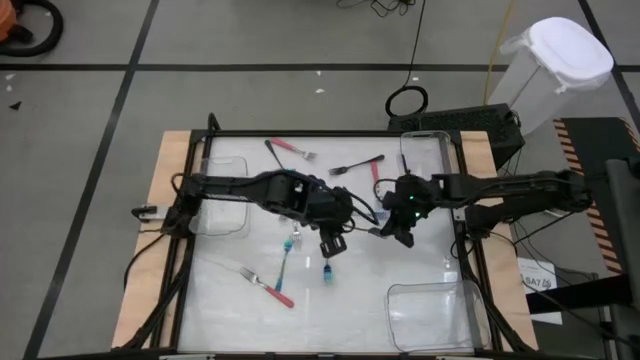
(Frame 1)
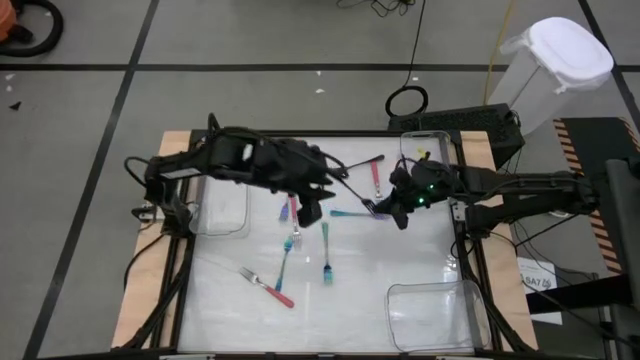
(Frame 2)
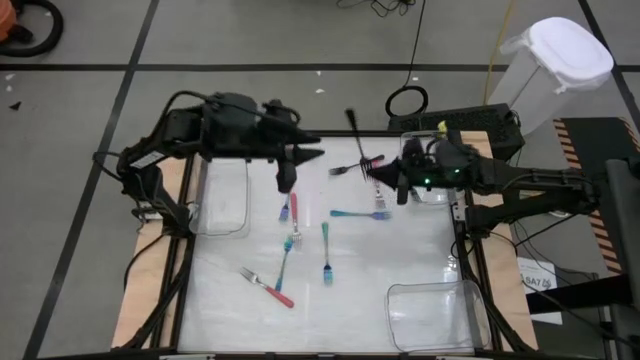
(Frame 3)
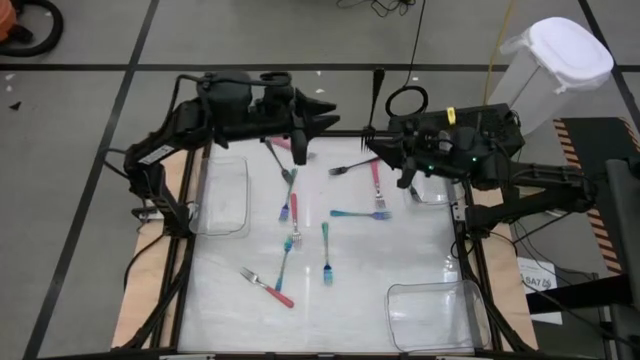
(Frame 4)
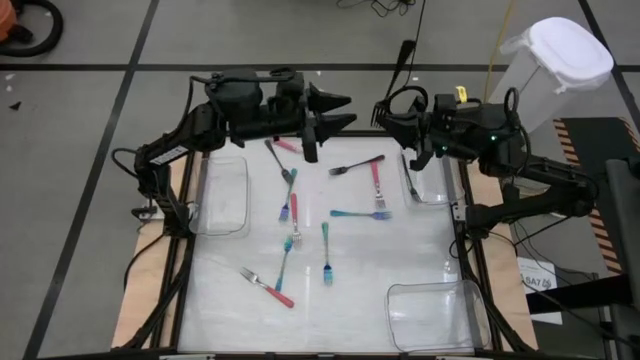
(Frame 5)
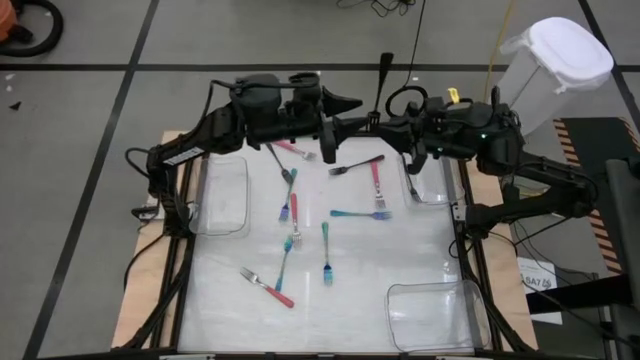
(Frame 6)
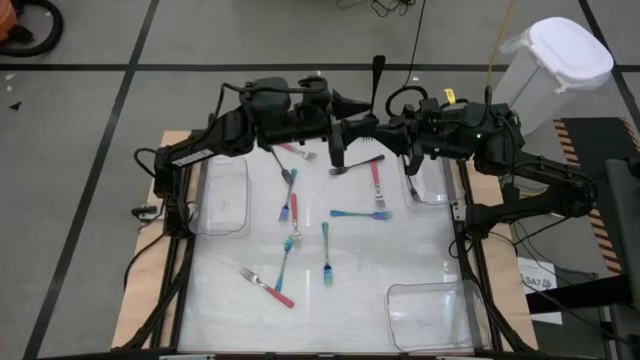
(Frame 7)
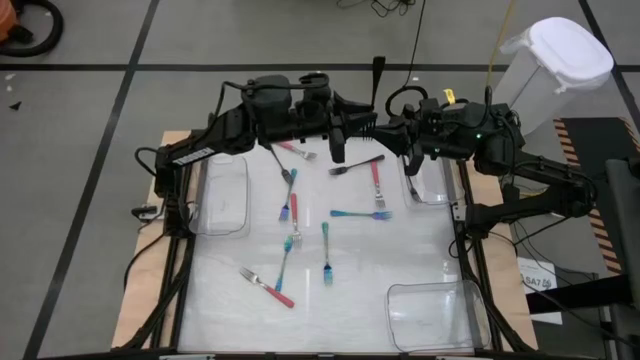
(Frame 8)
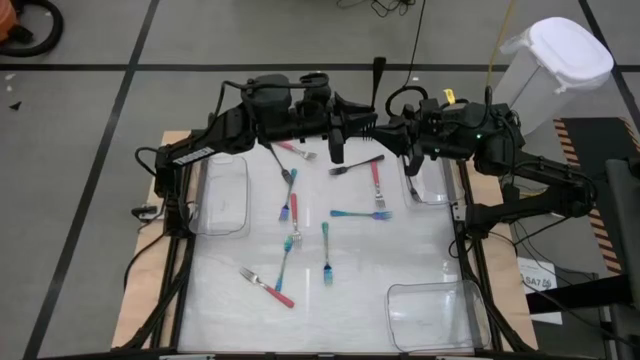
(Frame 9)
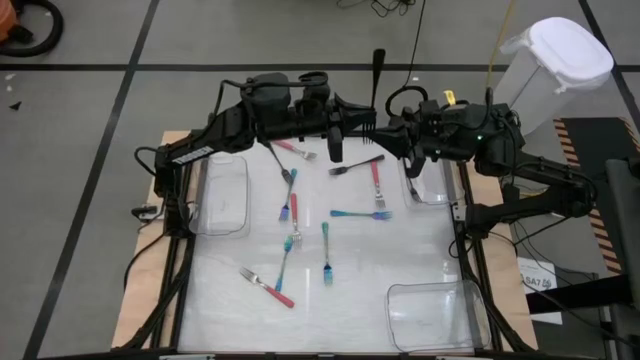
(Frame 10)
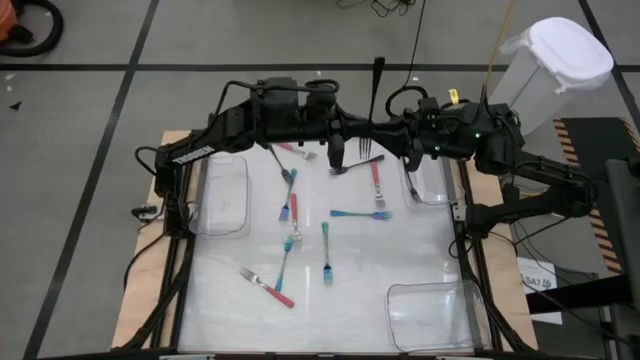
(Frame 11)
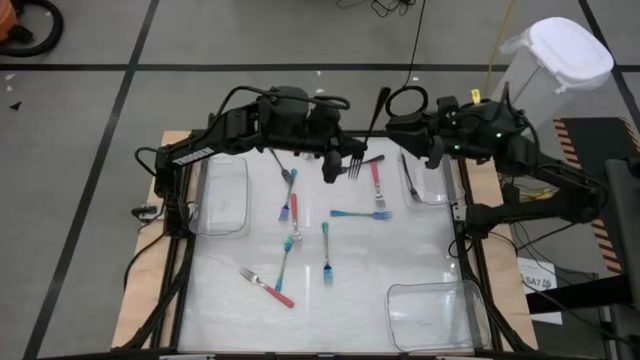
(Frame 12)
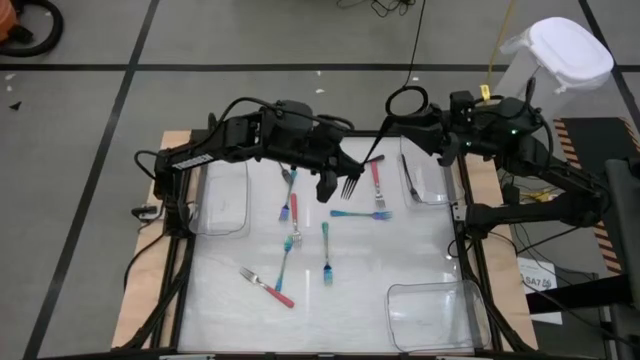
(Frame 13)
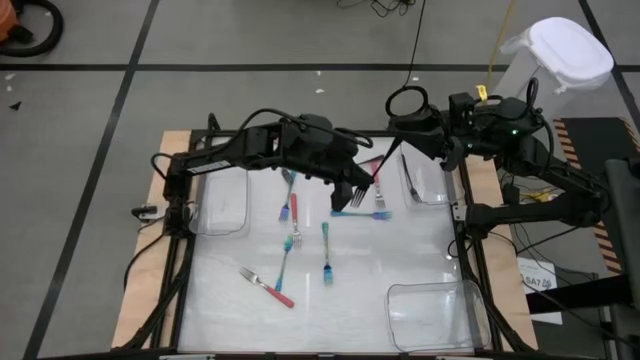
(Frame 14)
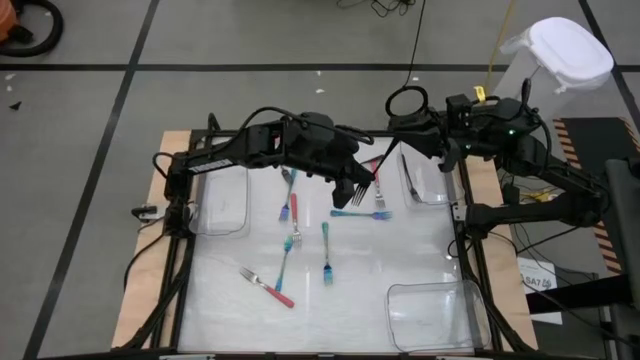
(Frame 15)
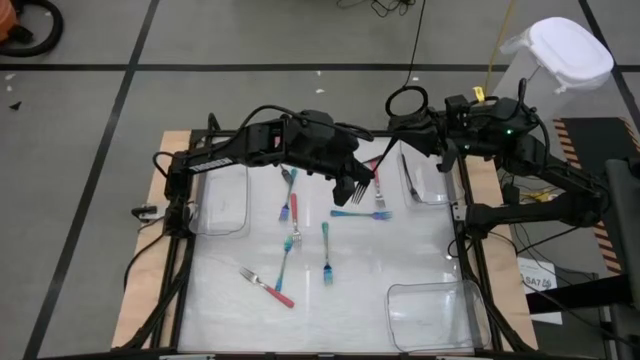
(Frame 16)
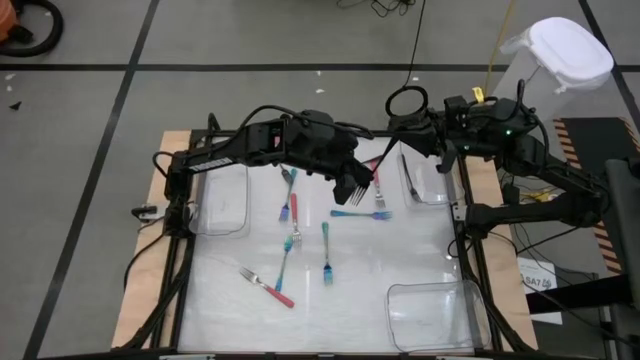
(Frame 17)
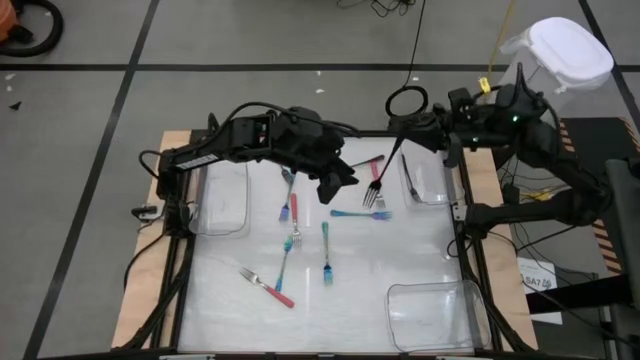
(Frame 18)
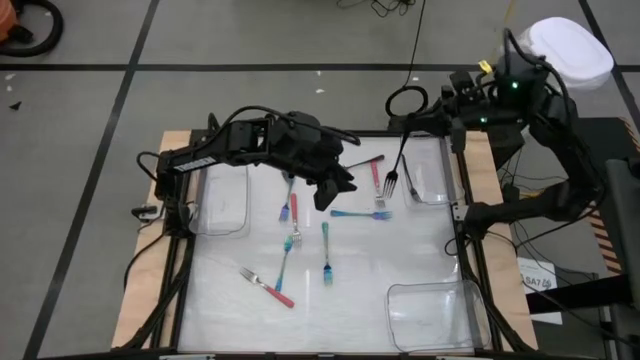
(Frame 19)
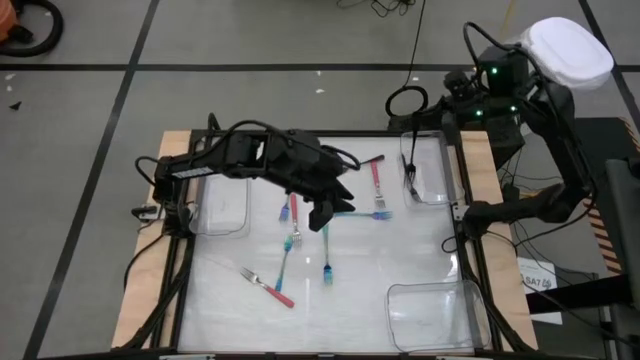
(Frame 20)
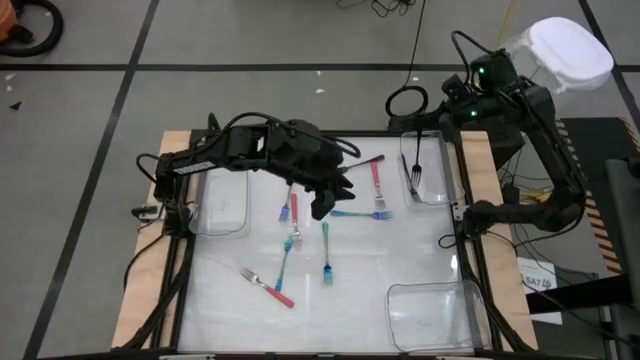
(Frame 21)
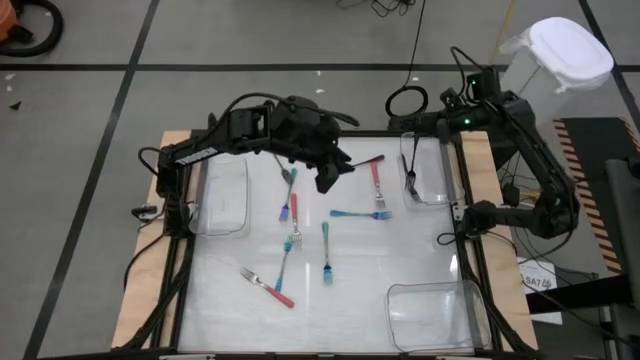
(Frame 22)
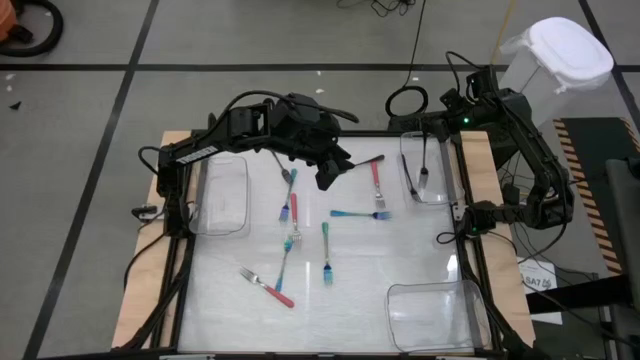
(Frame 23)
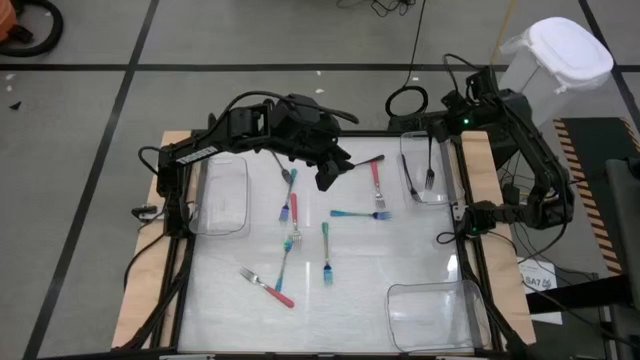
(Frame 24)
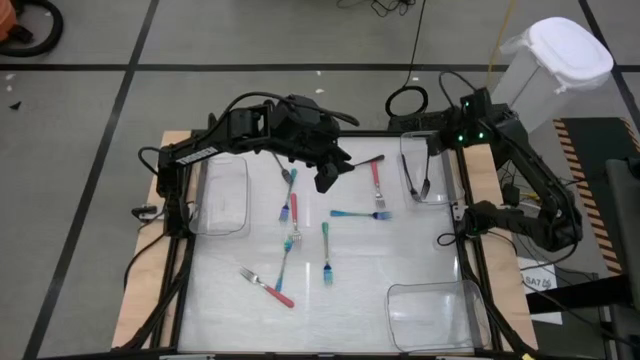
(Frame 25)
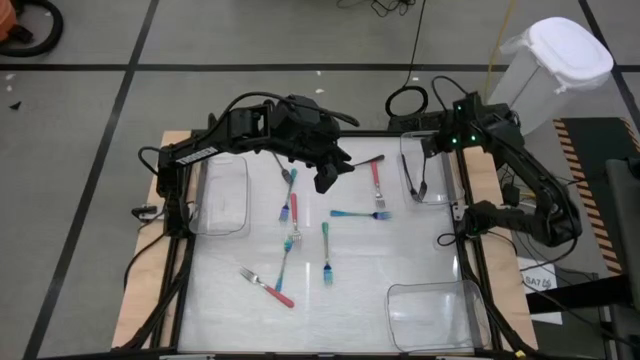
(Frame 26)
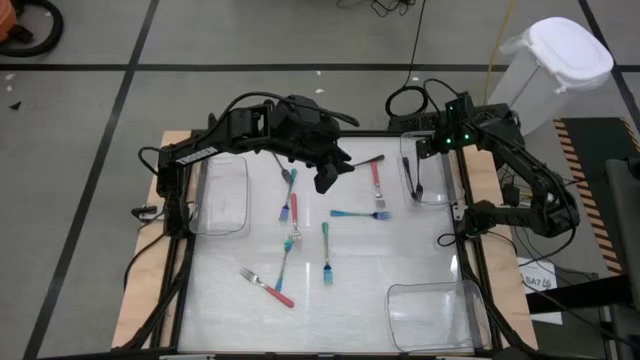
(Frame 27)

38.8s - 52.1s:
Task: Sort silverware by color (type)
Put the black fork into the top right transparent bin

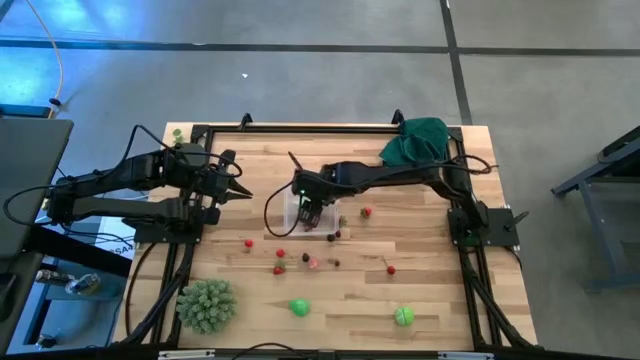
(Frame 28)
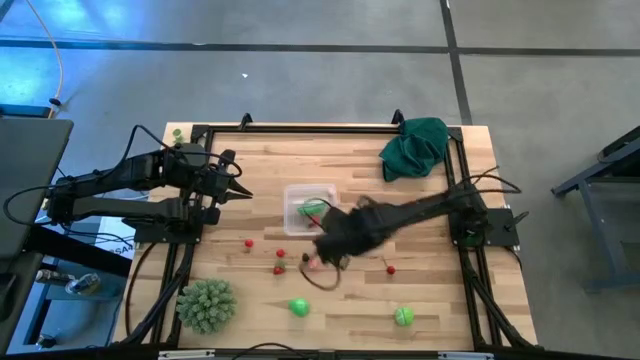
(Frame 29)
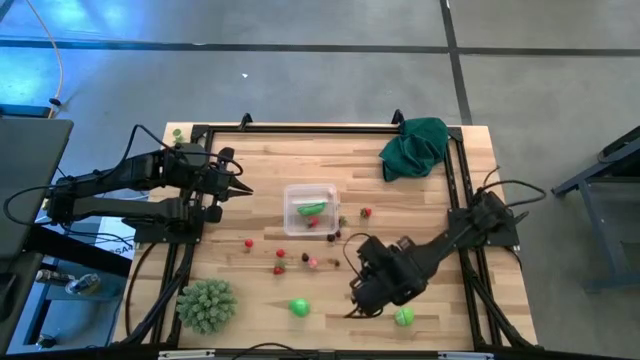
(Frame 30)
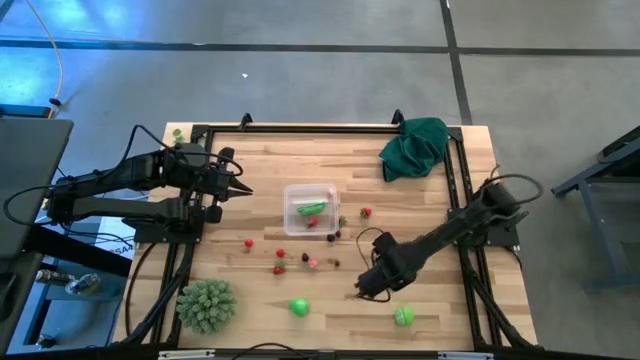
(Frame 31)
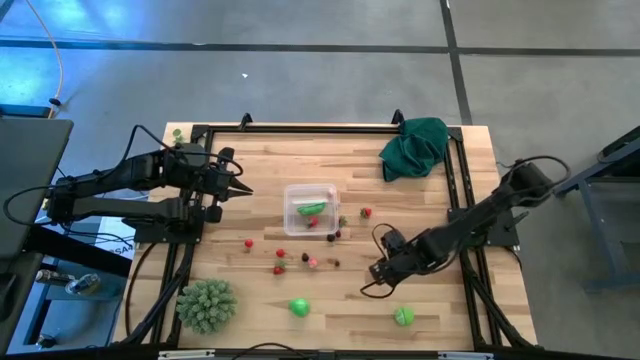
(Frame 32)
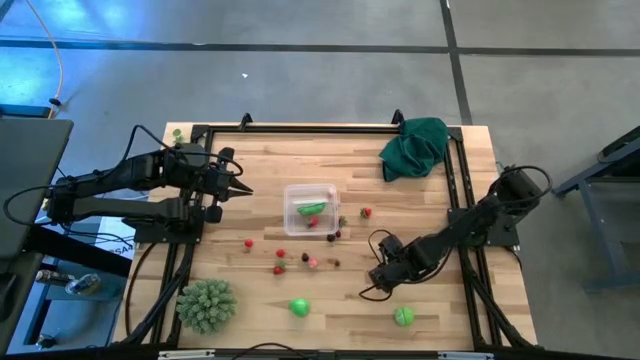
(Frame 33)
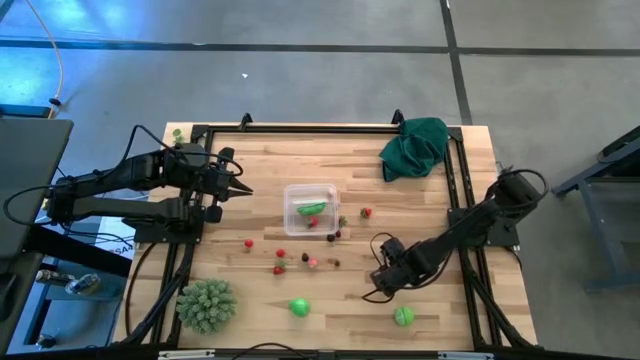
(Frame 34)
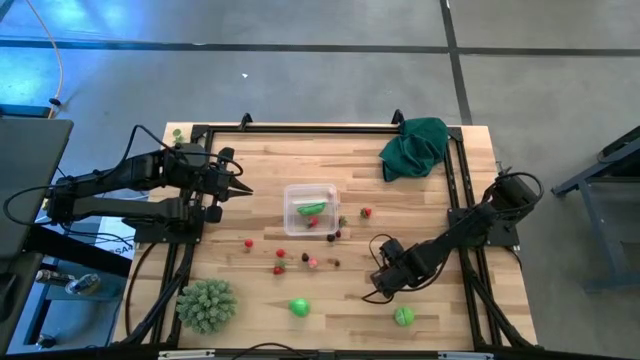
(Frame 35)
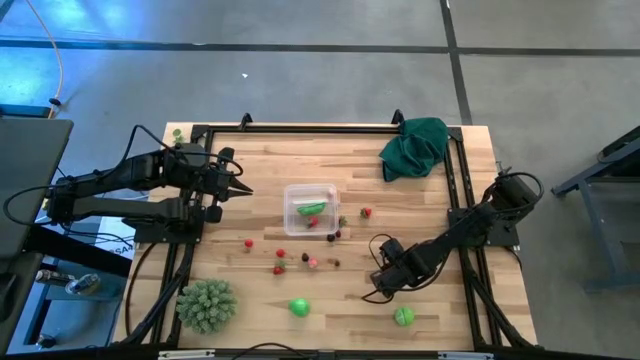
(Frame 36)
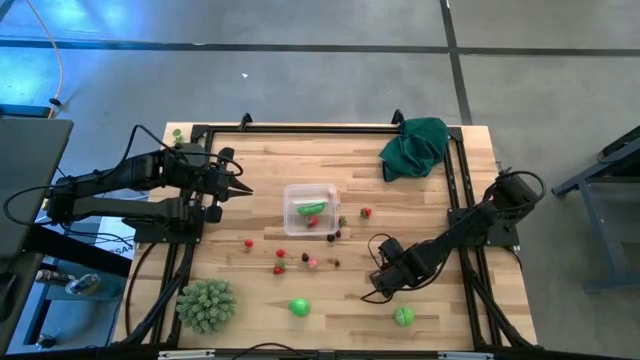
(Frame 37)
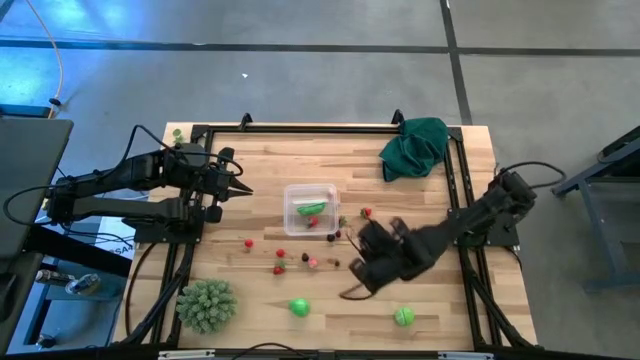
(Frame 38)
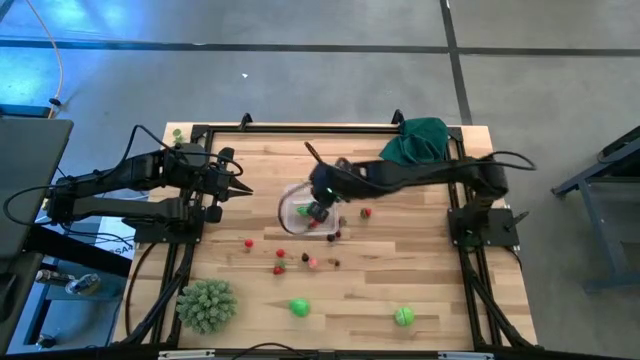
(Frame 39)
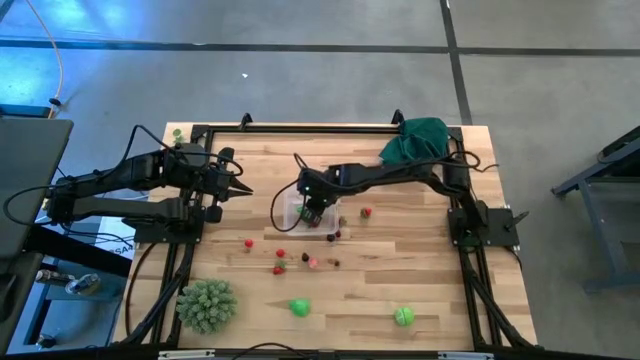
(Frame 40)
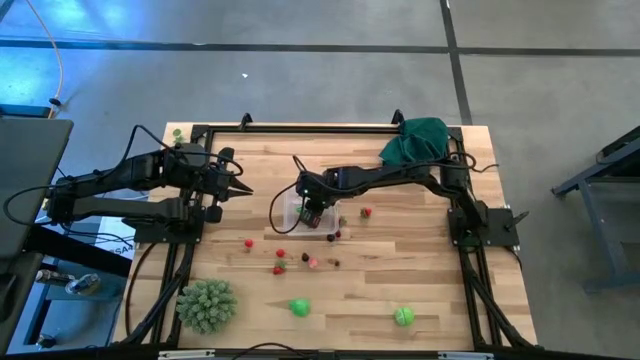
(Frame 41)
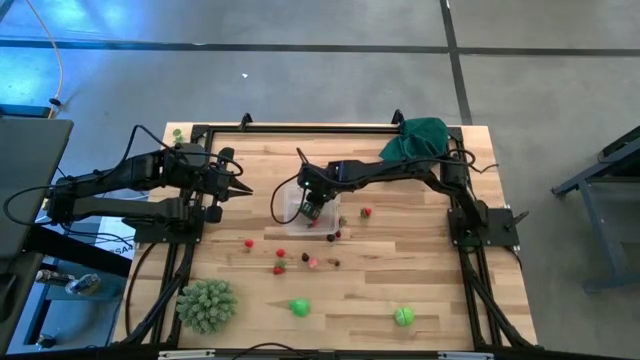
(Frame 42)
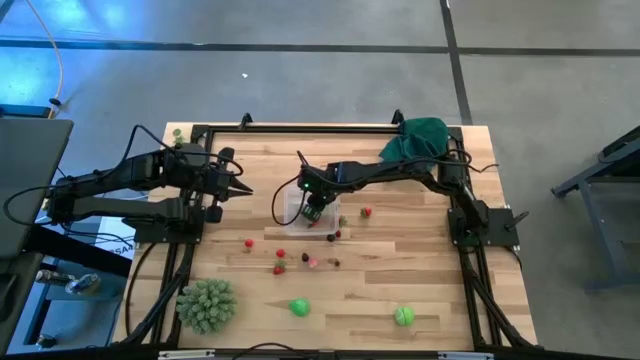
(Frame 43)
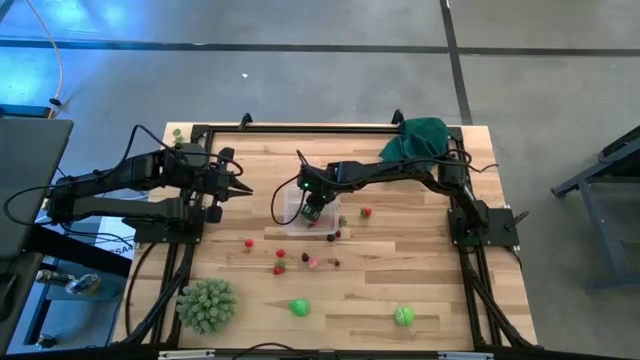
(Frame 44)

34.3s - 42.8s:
Task: Pick and placing Produce into tupperware
Put the red cherry into the transparent container
